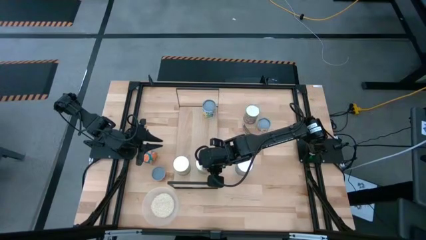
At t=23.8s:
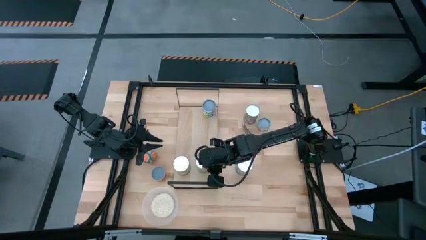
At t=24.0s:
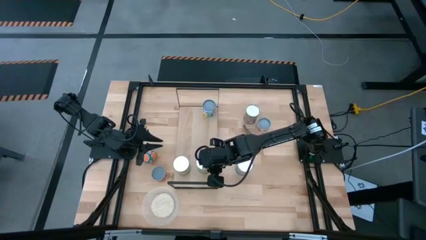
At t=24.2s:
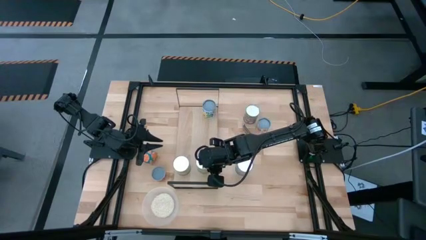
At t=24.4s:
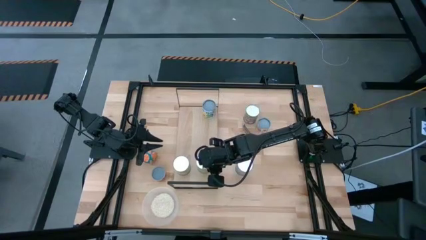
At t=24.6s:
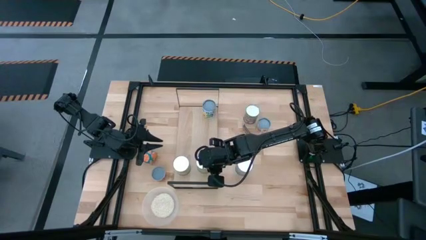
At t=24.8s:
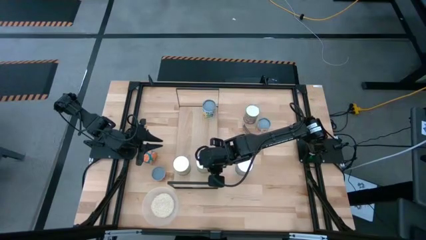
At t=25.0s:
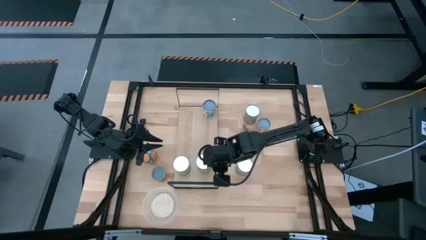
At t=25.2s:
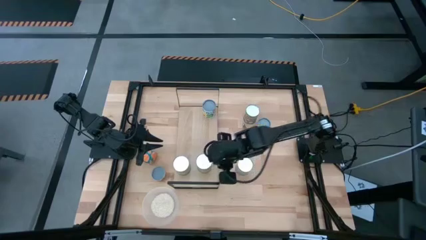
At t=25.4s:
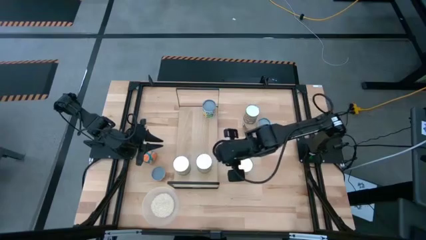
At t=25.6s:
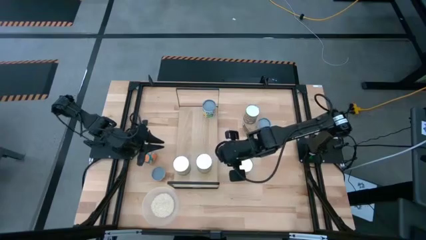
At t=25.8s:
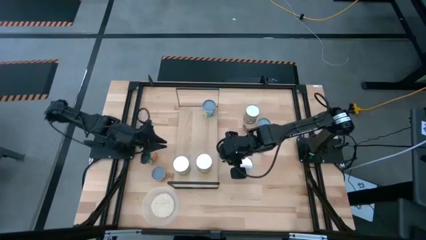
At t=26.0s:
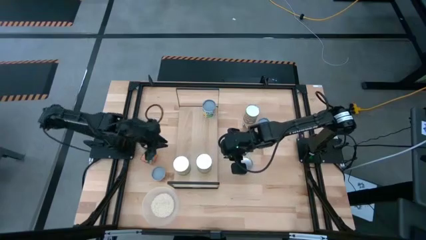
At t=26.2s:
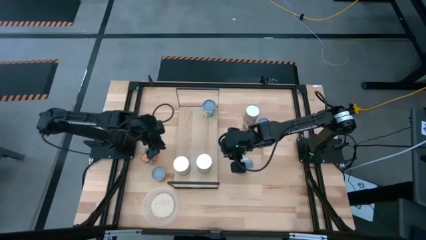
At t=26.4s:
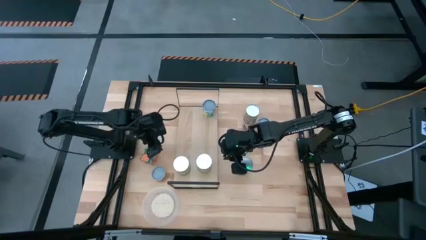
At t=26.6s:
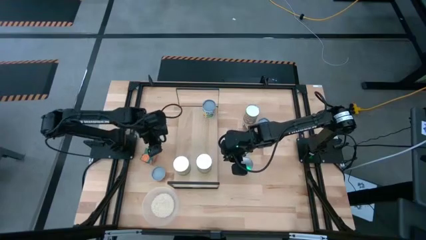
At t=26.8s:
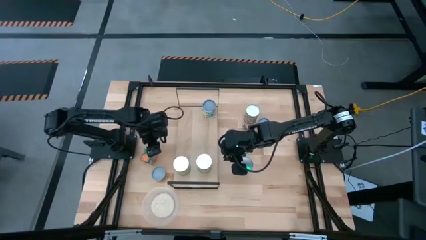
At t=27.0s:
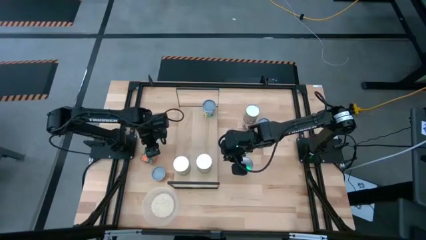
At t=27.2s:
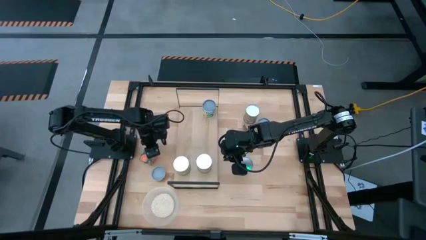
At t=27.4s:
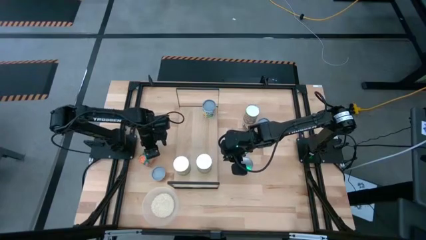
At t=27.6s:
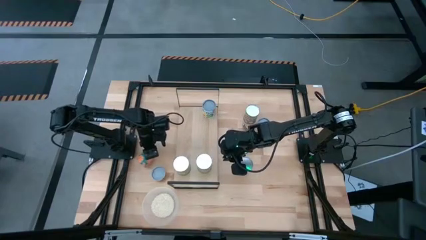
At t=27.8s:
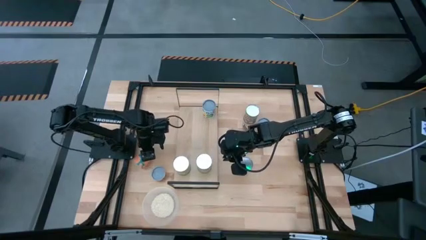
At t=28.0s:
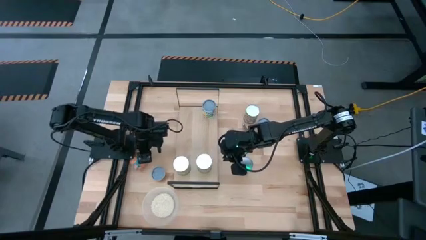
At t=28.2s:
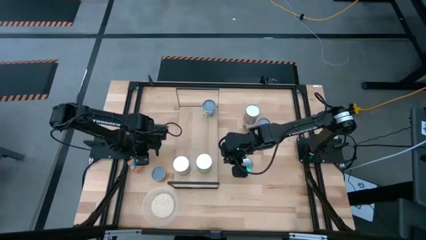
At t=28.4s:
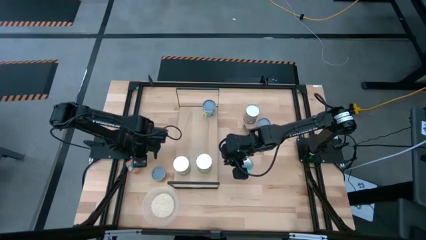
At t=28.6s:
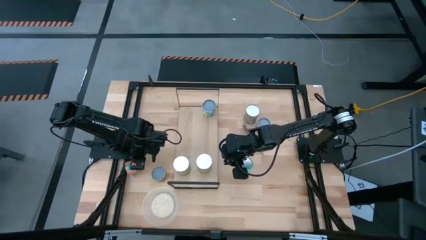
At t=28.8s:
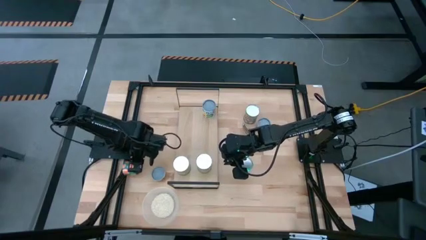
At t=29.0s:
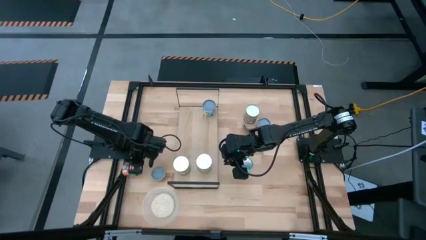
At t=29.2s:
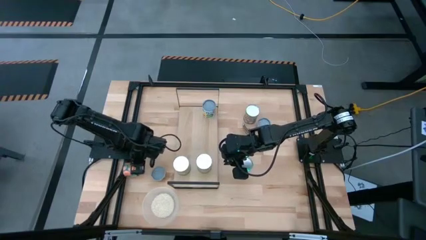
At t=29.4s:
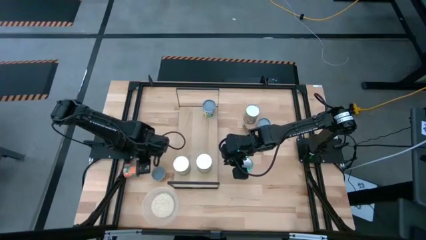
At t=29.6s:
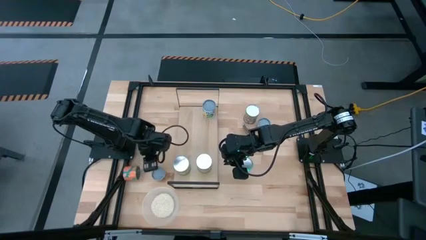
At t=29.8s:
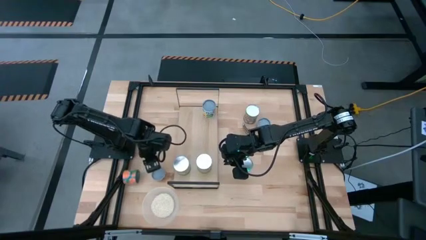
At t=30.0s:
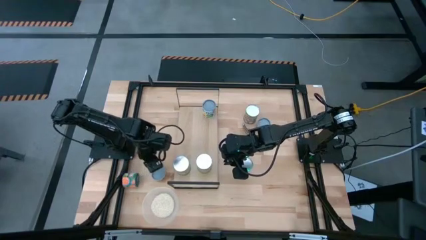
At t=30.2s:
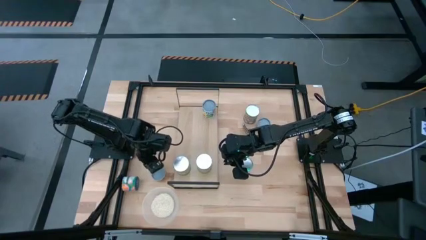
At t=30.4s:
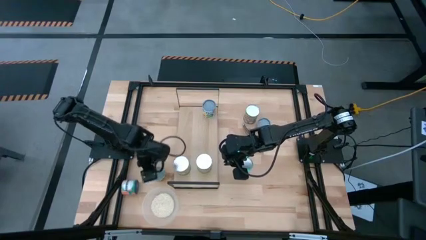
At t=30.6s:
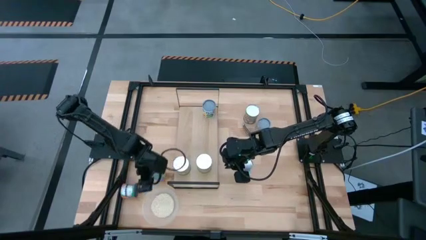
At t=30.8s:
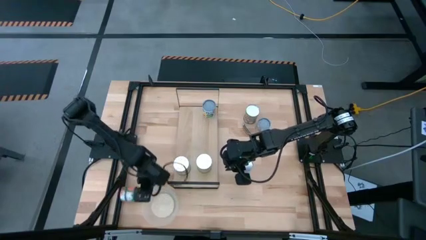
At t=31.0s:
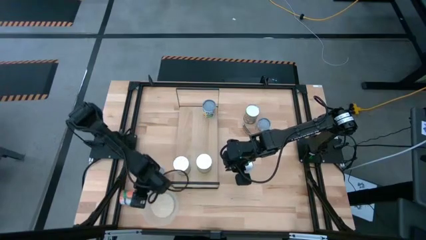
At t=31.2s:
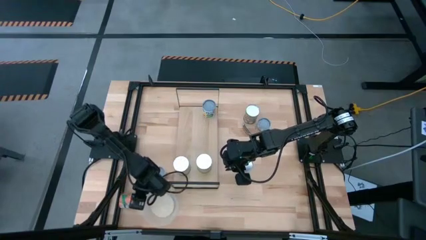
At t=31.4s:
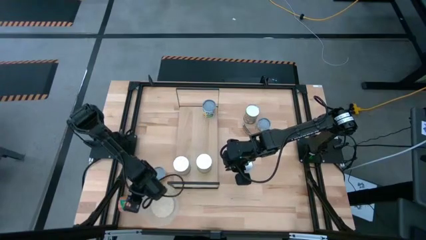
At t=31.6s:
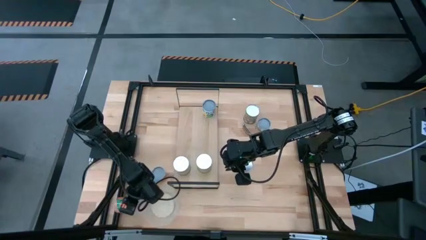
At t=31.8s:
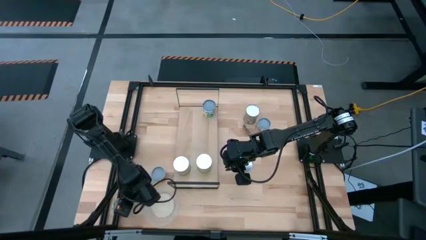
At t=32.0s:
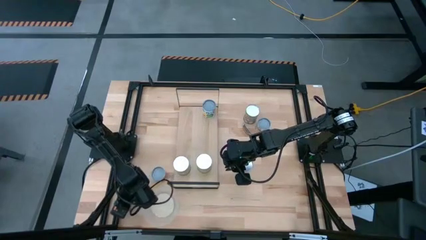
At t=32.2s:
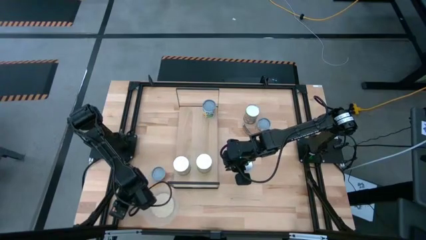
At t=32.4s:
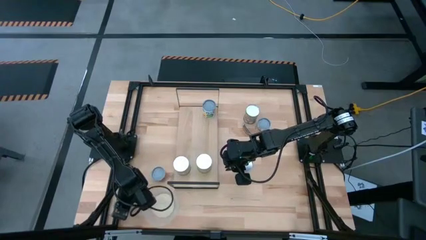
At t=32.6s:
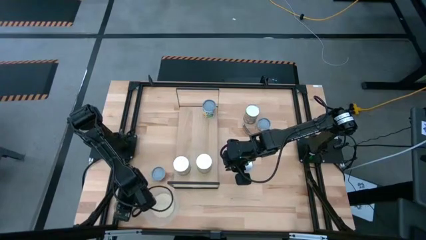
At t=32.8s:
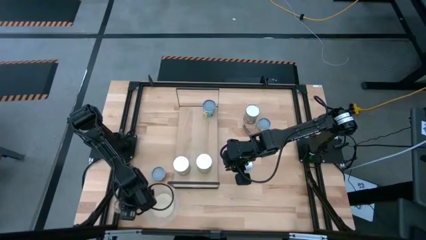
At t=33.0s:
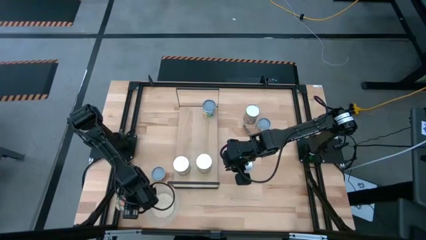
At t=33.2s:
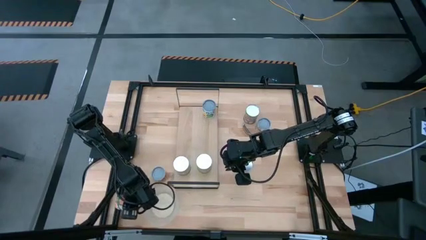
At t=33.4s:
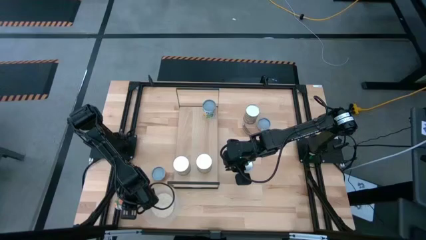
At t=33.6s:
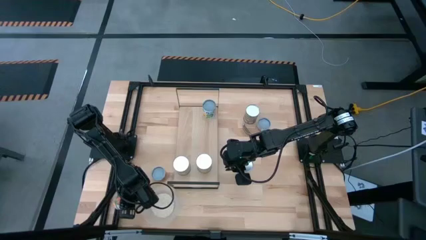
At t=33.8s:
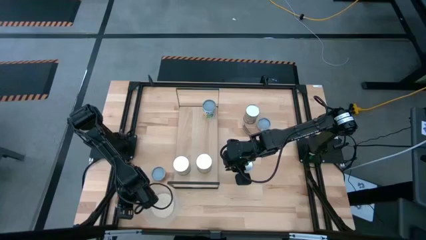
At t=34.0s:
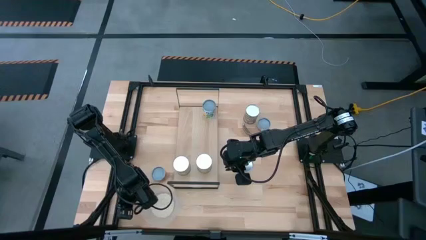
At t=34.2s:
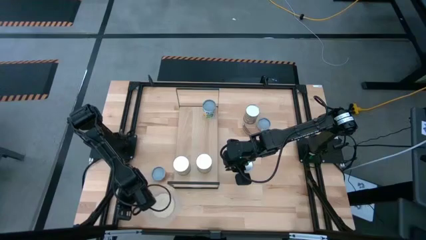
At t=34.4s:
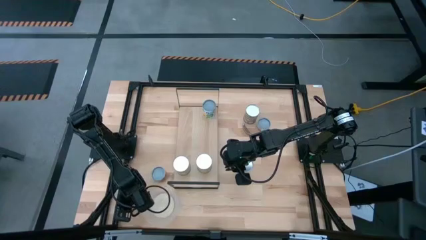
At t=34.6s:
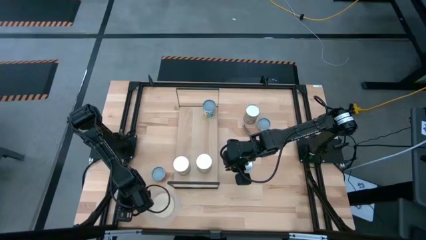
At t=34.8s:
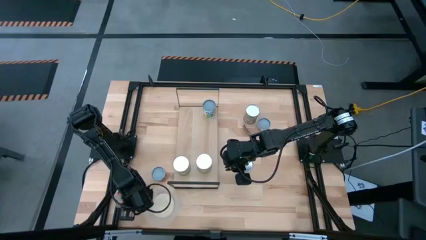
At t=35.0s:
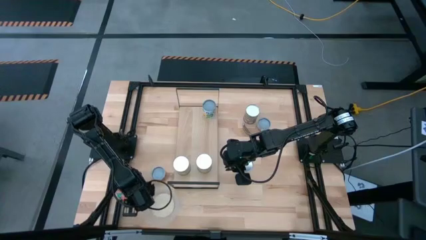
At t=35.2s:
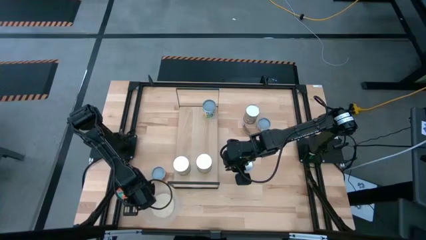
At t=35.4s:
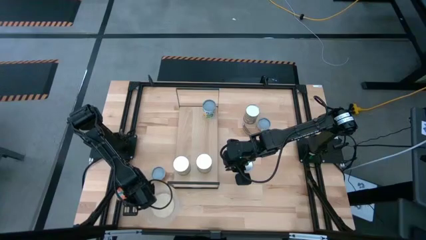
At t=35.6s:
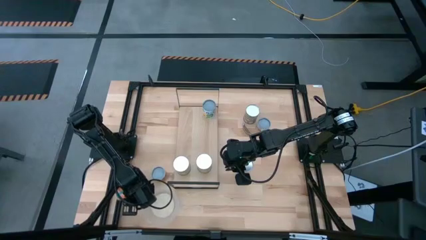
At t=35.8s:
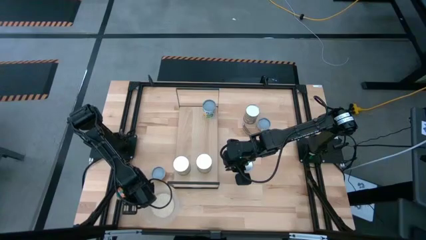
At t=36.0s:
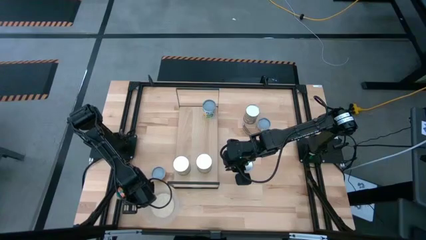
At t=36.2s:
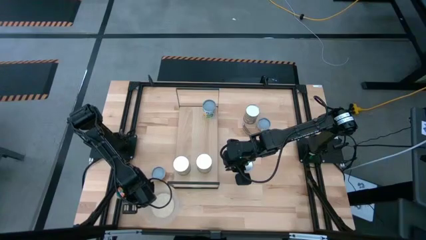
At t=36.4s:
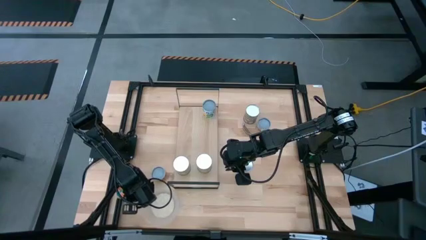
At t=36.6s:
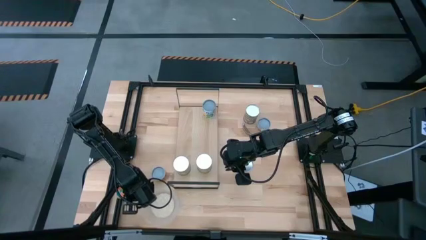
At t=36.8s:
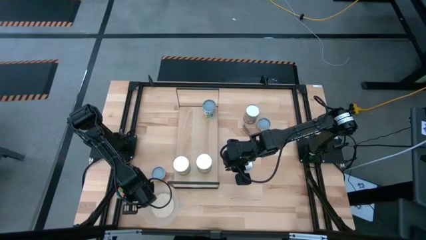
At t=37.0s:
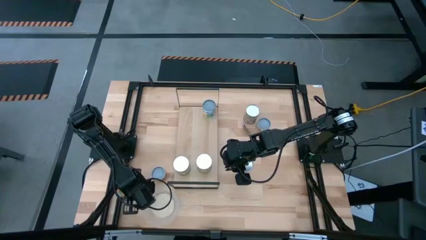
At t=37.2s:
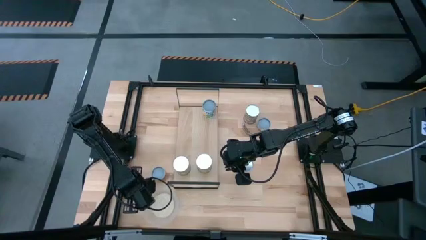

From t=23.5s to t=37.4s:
Task: Pick and place cans onto a shelf
Put the small canned oranges on the shelf
